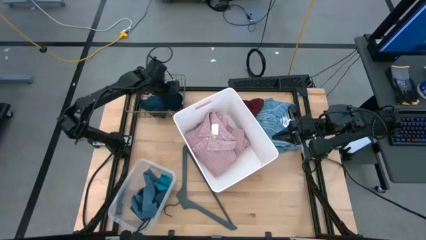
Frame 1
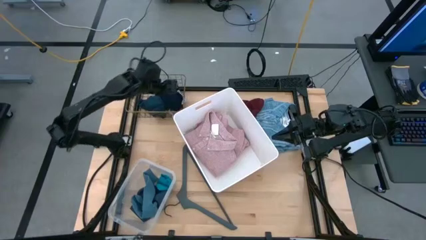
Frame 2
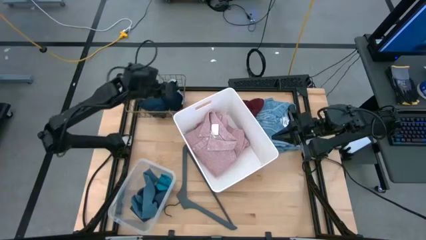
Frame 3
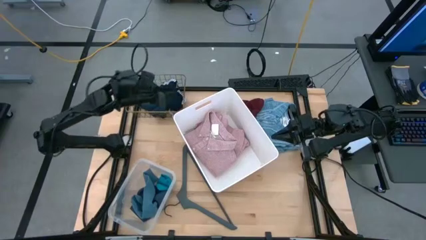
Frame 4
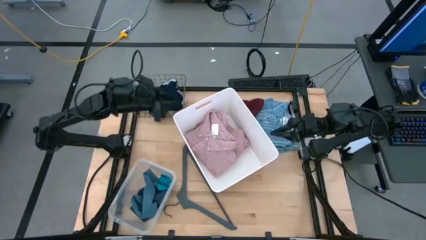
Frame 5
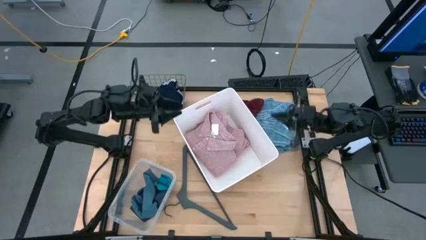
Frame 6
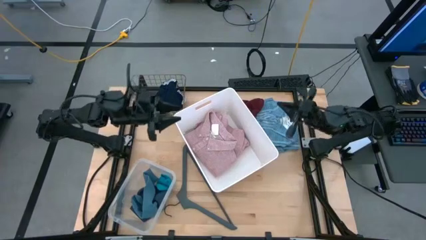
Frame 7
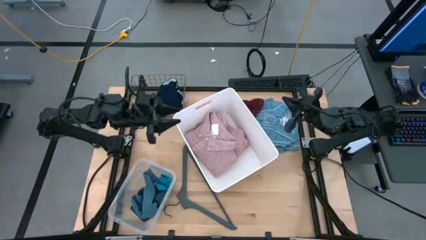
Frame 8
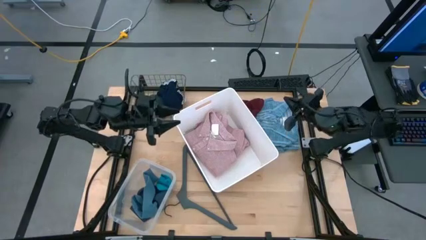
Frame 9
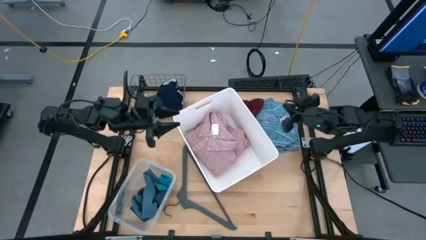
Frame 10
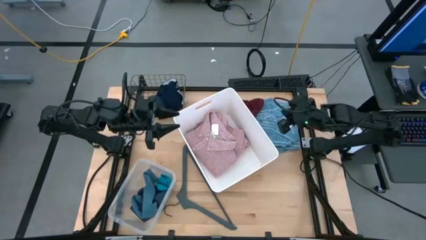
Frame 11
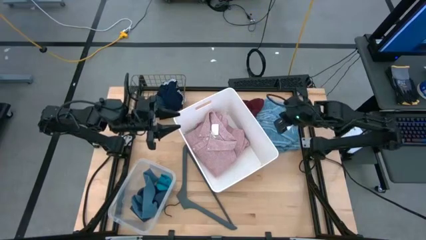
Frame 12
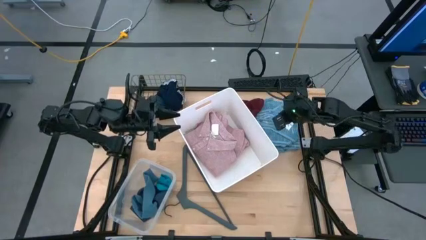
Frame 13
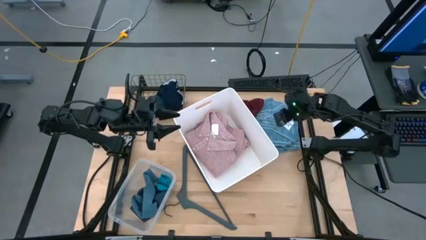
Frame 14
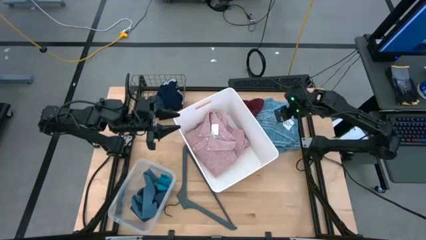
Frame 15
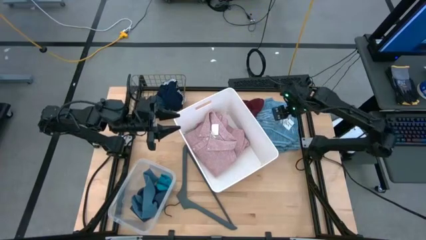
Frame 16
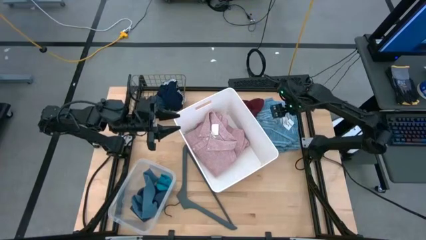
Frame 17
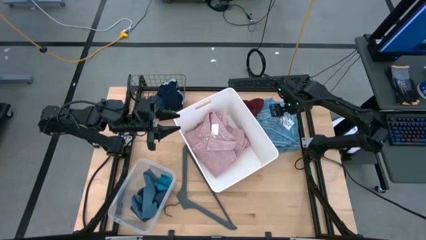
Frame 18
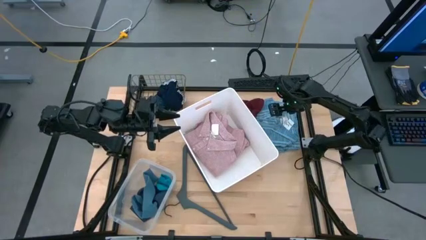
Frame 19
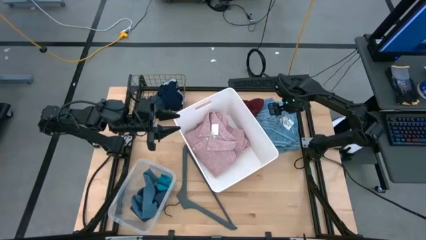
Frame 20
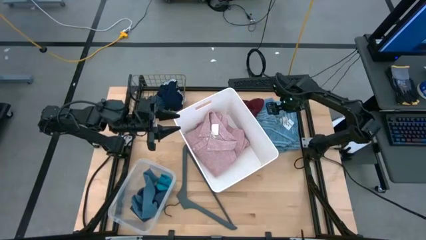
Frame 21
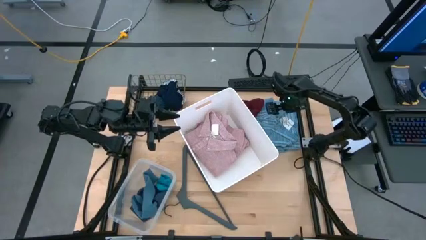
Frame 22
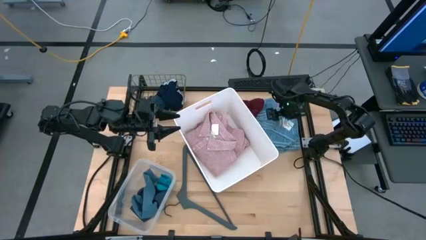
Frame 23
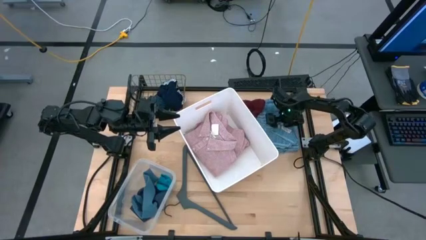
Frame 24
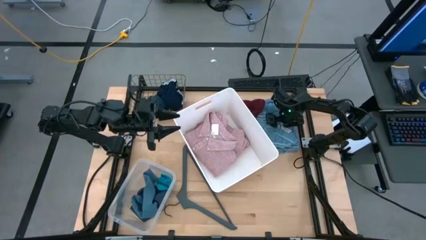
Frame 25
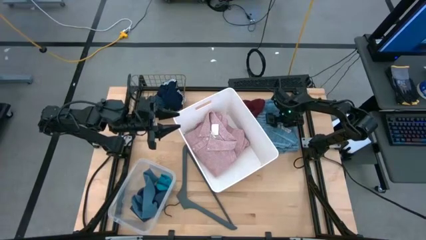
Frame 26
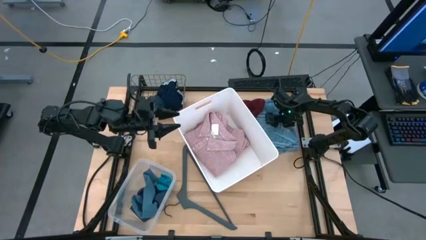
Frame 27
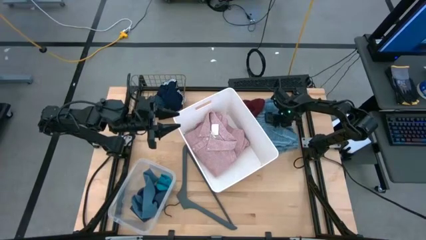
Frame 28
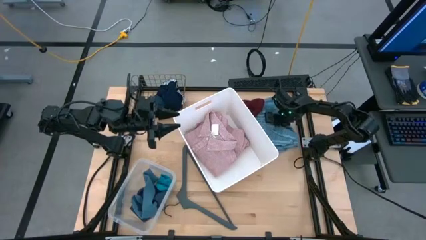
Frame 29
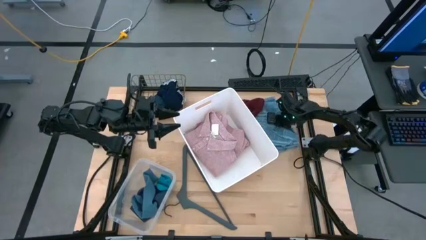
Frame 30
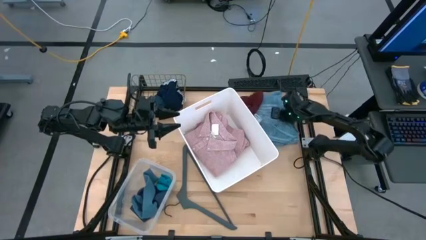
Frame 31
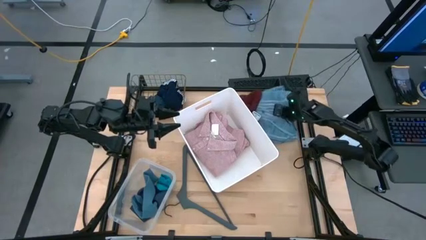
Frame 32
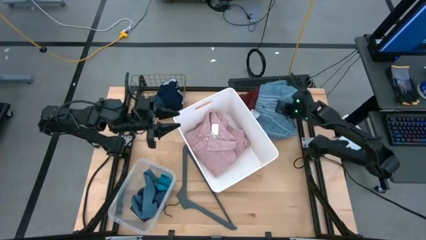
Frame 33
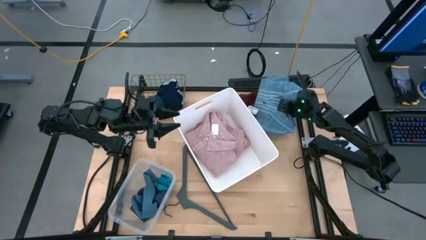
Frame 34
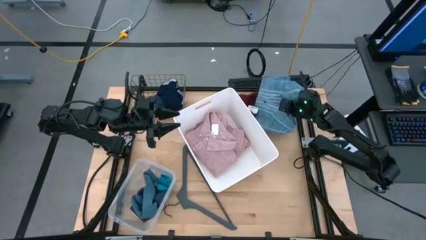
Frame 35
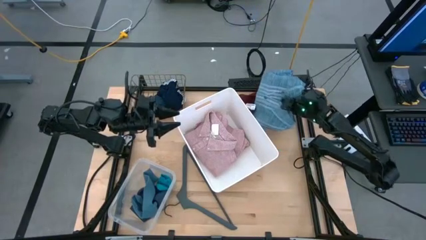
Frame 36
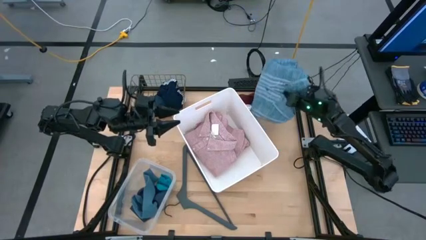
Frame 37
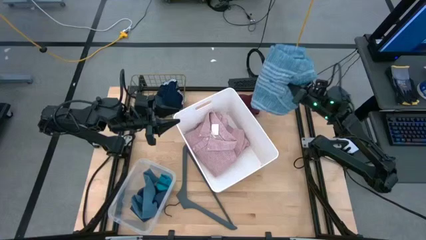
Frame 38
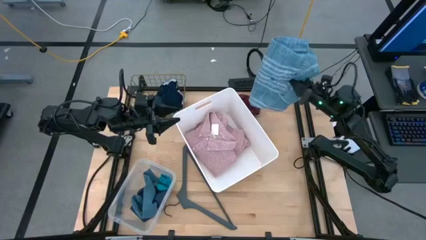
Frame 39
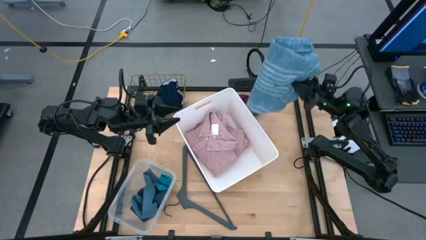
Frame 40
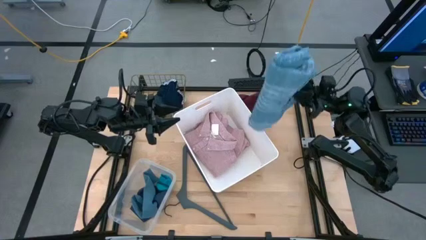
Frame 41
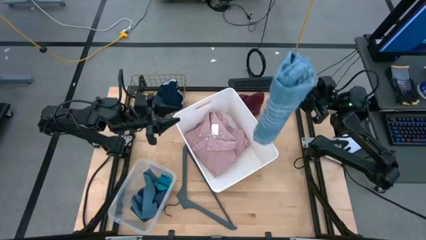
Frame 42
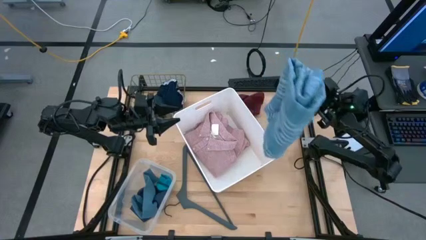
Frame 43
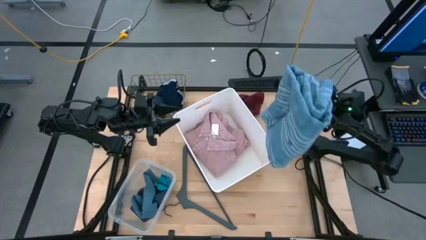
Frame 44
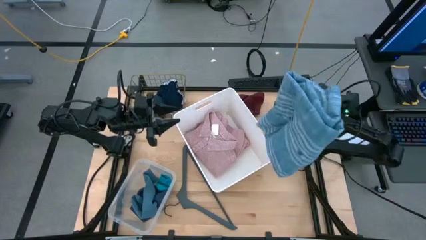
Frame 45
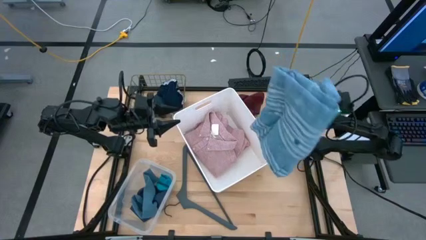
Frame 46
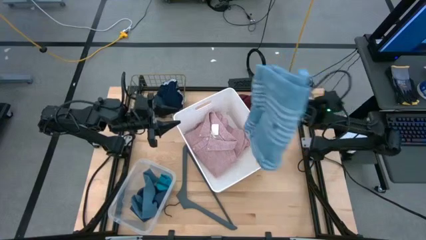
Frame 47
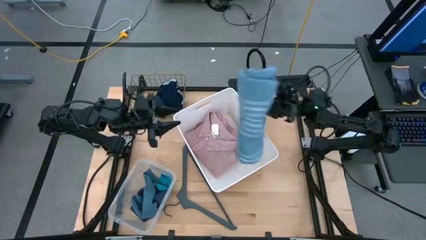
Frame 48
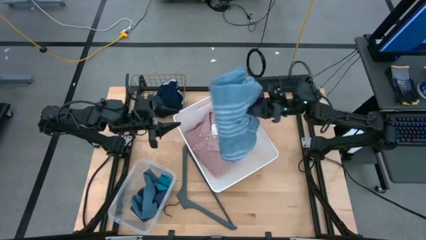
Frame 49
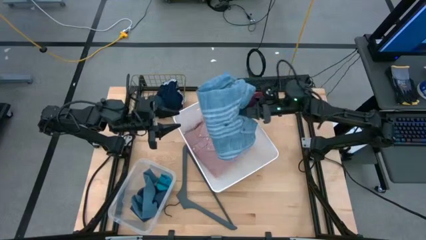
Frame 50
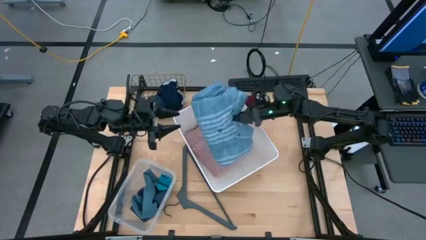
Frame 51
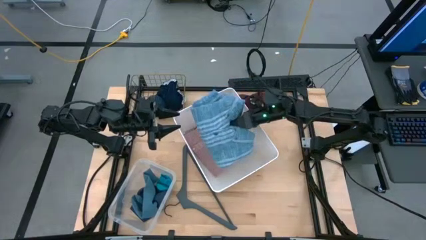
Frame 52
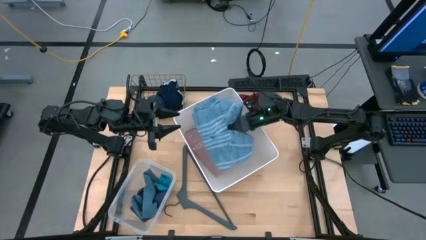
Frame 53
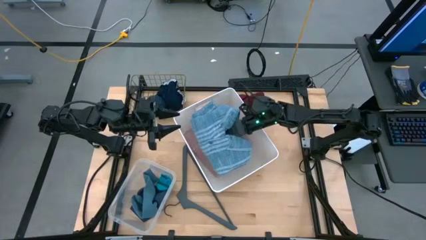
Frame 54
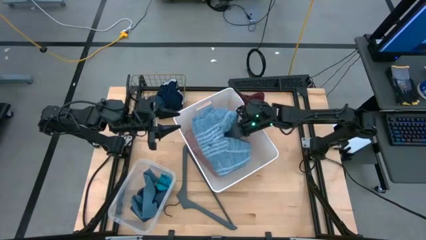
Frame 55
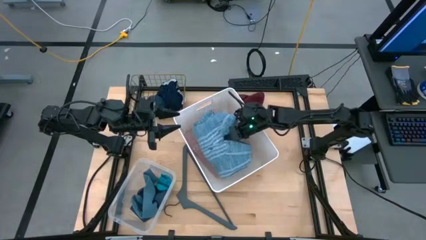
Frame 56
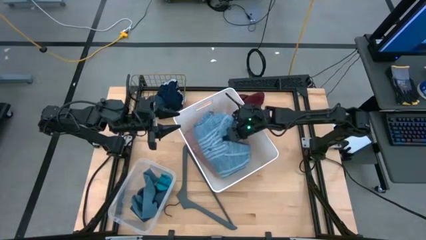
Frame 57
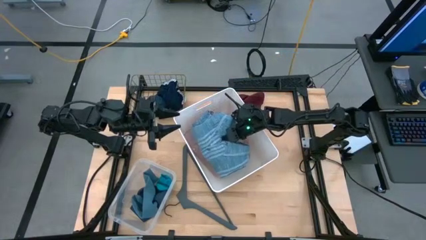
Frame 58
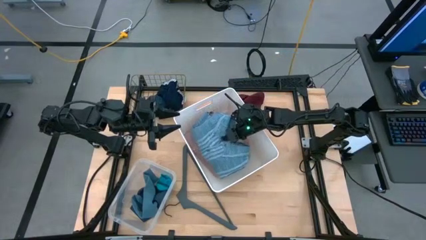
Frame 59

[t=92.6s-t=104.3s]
Task: Pick & Place Cloths
Put the light blue shirt into the white bin
